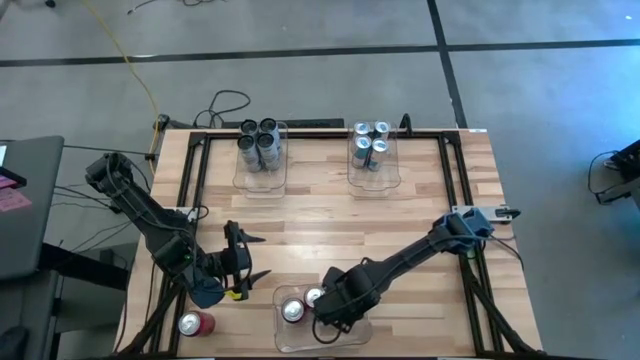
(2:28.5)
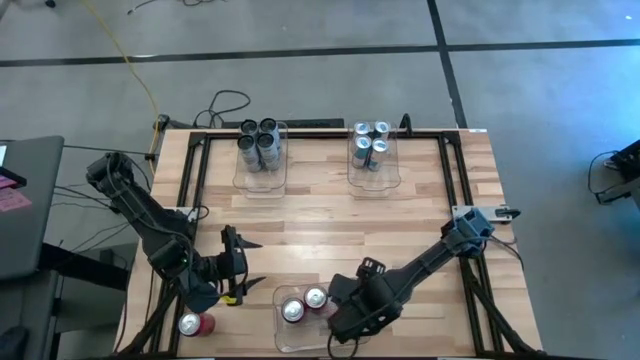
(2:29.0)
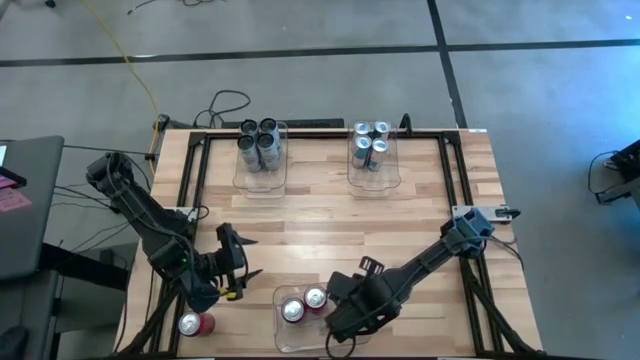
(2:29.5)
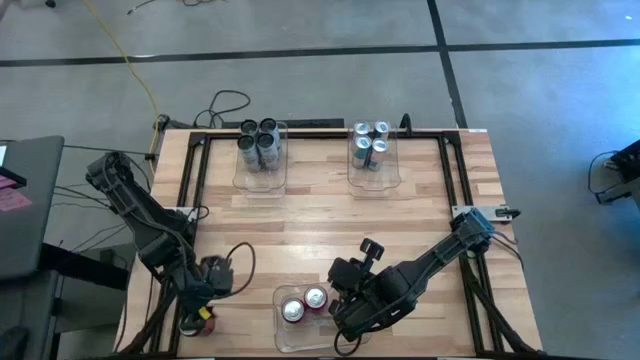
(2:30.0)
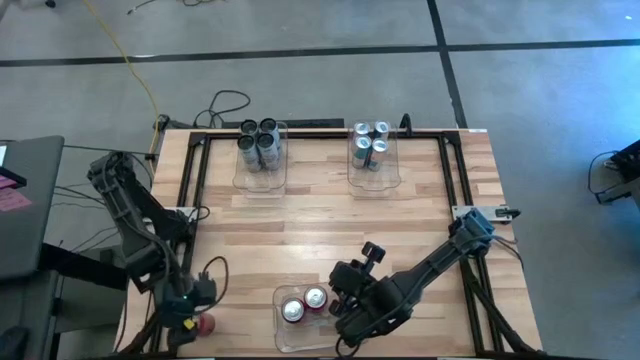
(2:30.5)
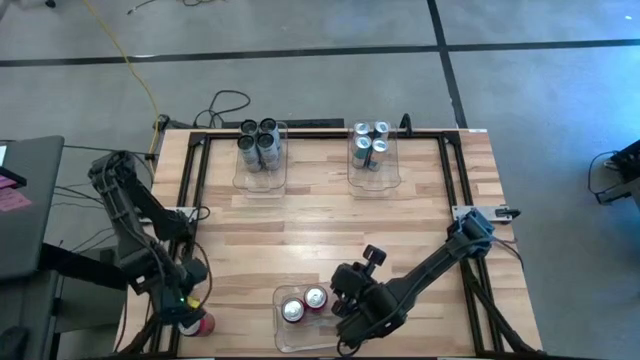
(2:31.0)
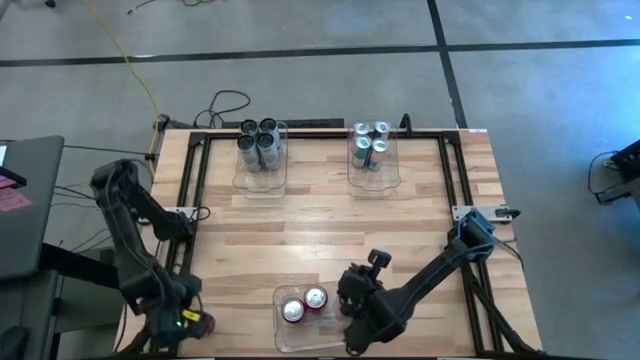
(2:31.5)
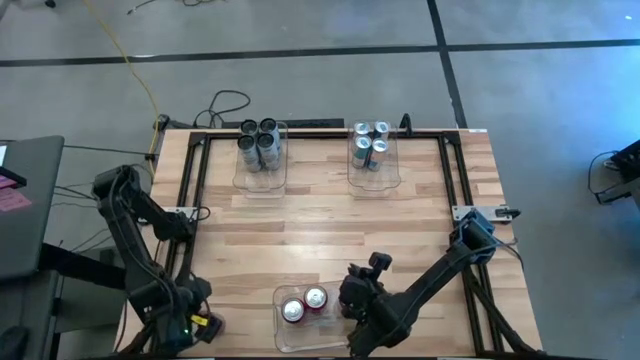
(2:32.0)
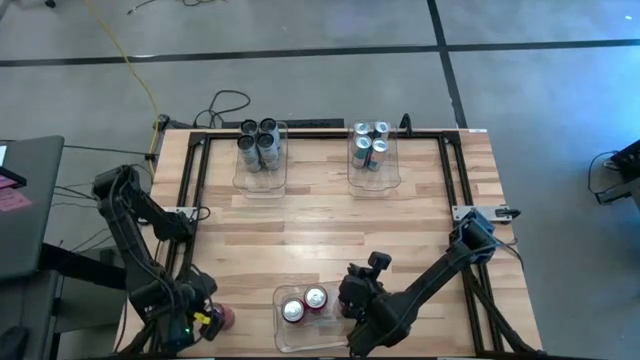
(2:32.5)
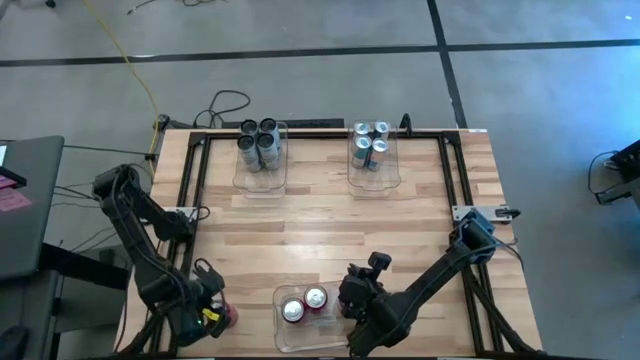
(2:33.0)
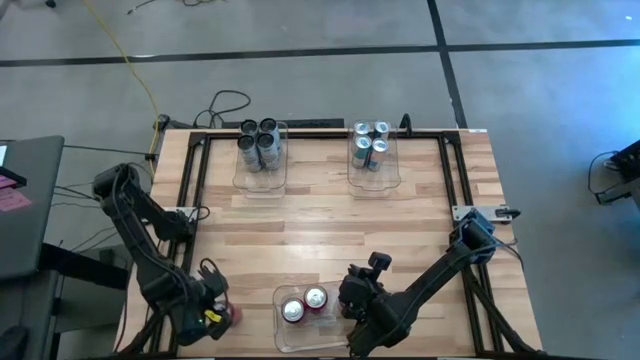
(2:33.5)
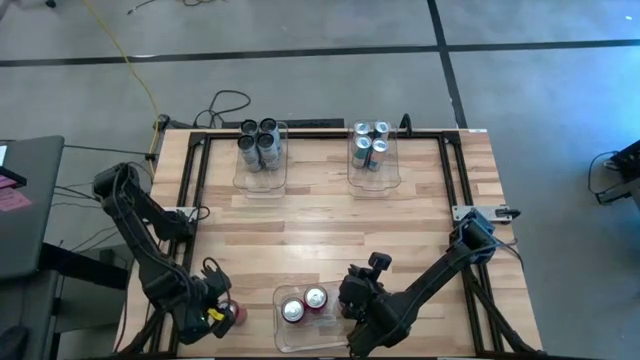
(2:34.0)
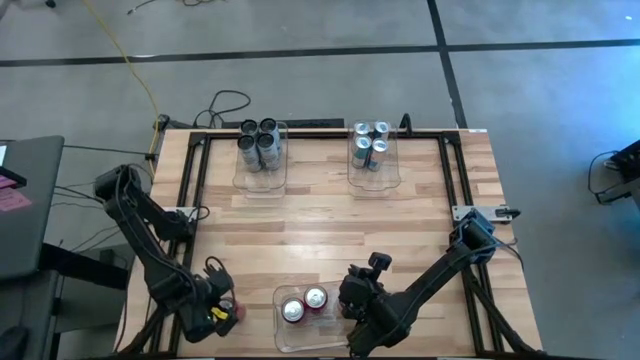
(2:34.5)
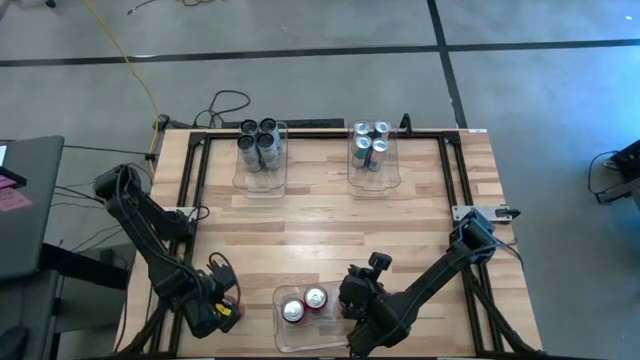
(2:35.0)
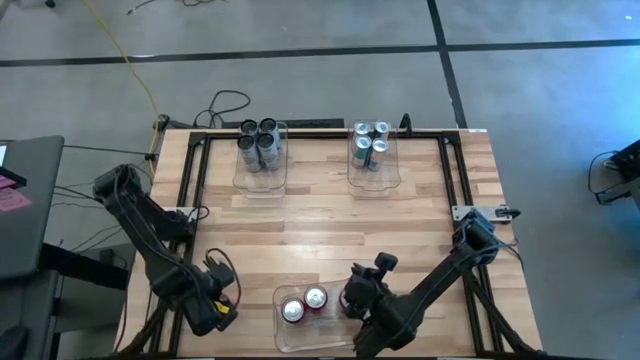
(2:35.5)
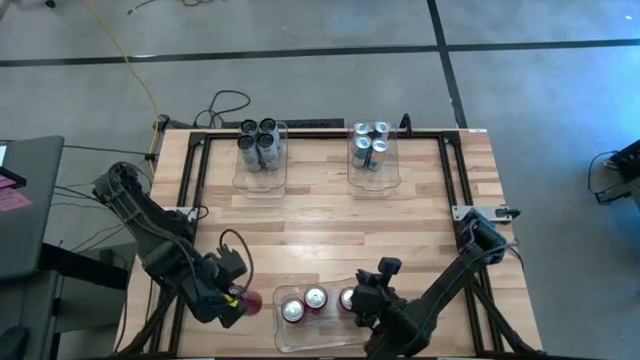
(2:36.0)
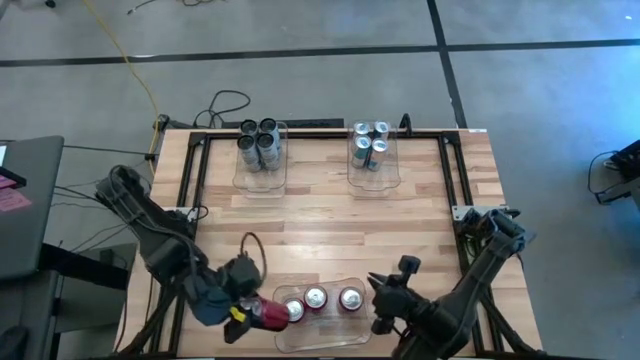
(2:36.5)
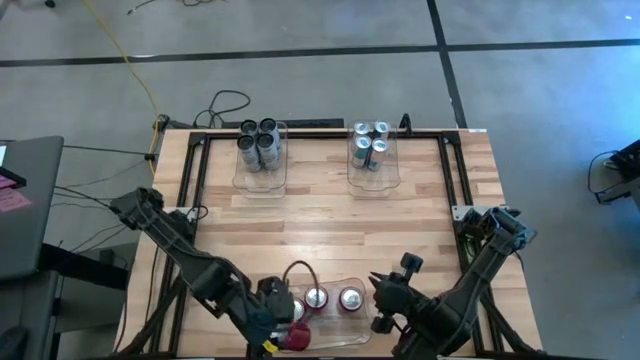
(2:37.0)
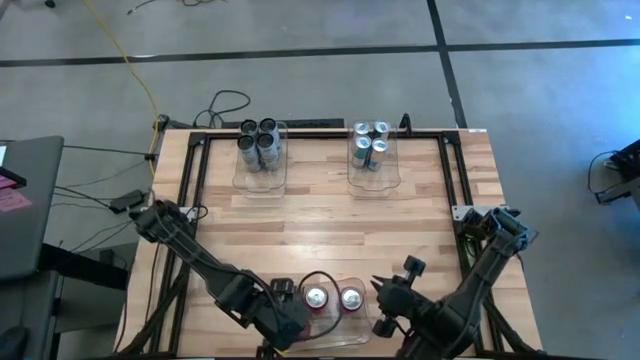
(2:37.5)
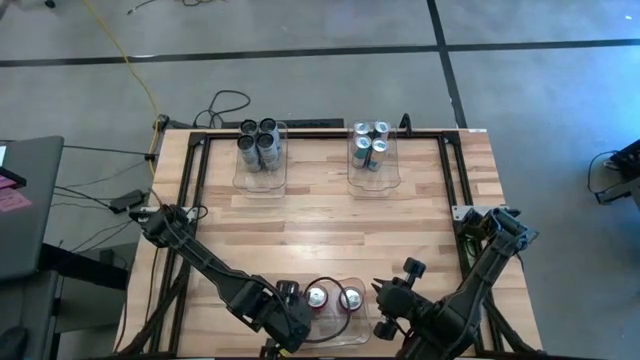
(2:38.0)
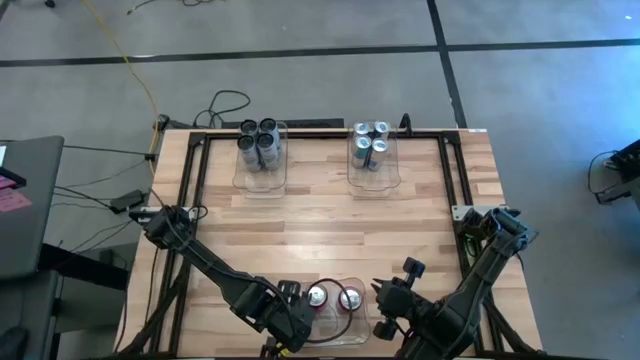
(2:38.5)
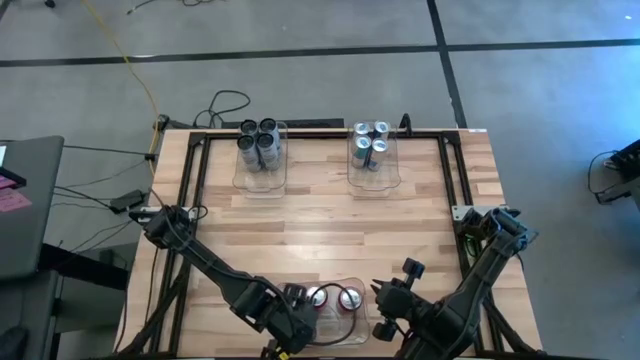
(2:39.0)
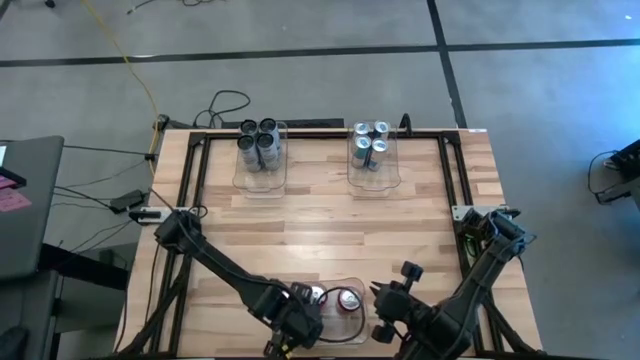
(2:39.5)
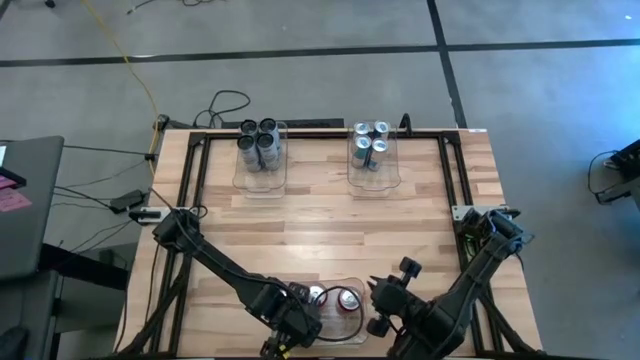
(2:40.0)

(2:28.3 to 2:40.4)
Task: Sort soda cans
Put the red and black soda can into the bottom transparent bin

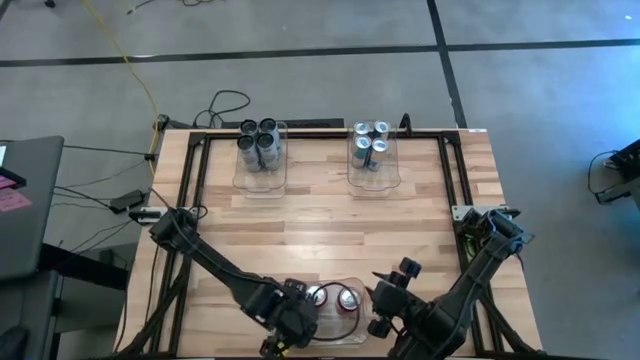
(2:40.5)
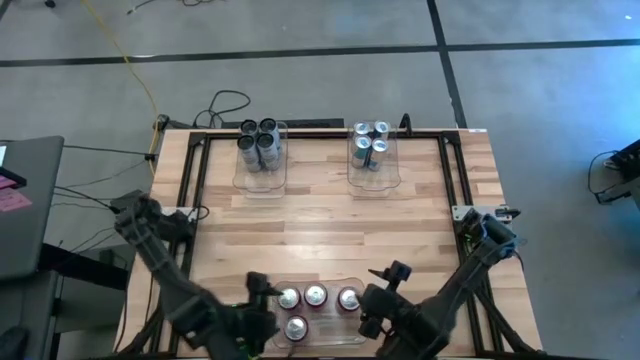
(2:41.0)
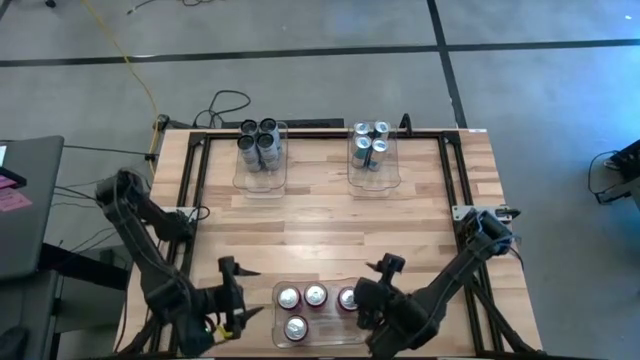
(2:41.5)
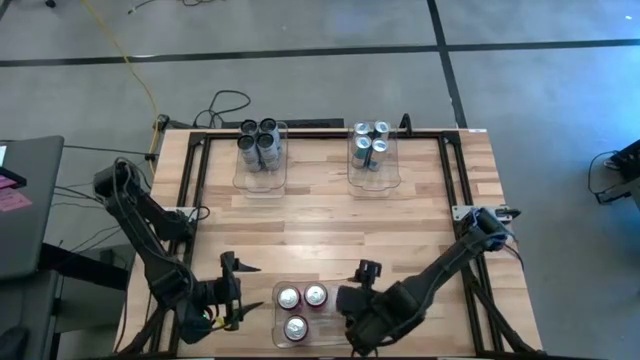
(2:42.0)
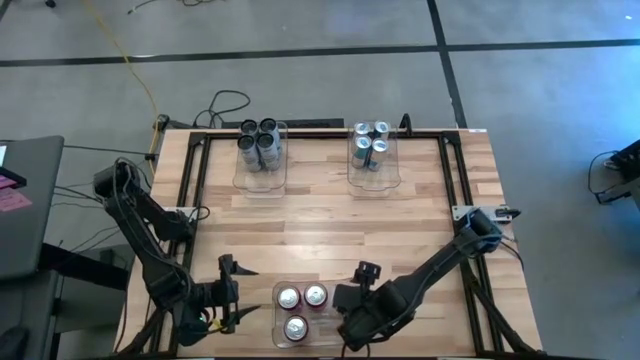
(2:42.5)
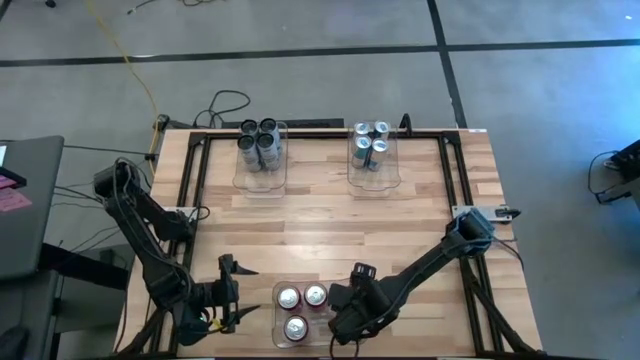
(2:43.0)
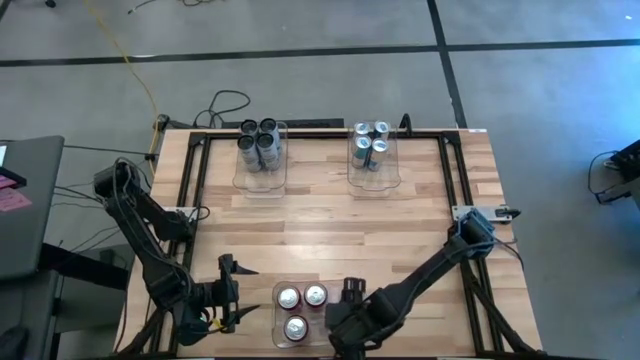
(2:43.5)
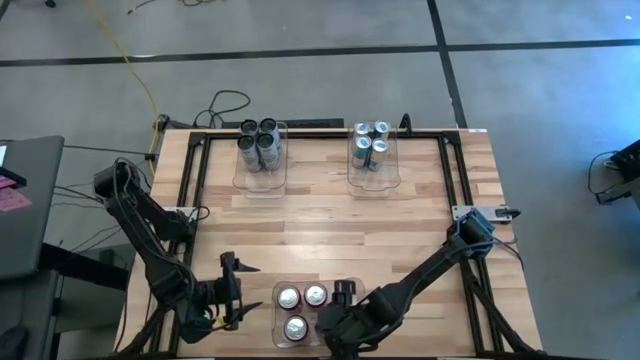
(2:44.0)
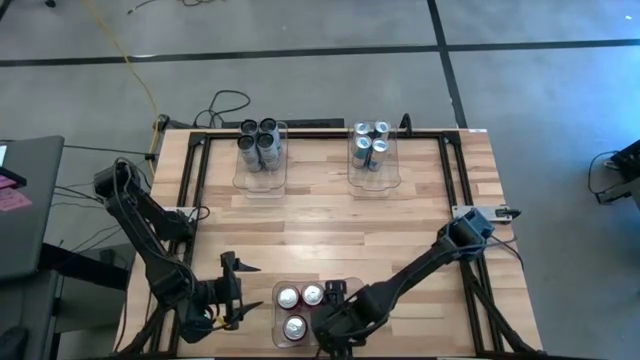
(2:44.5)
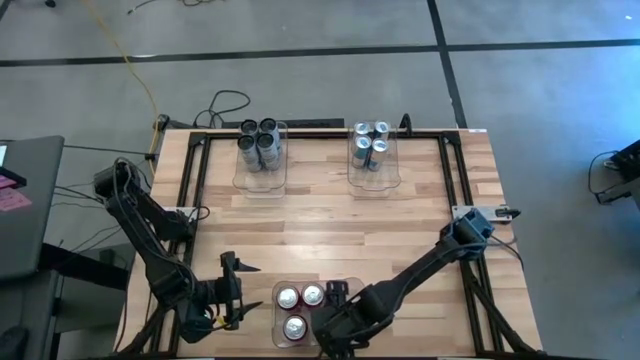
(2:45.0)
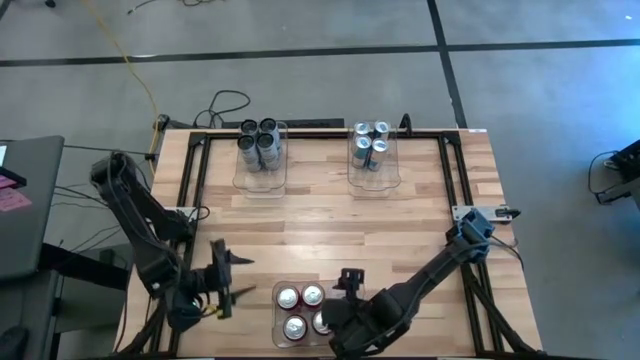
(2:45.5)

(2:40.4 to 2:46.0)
Adjust the red and black soda can in the bottom transparent bin

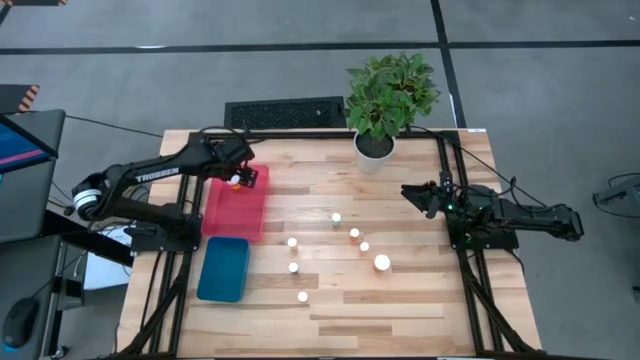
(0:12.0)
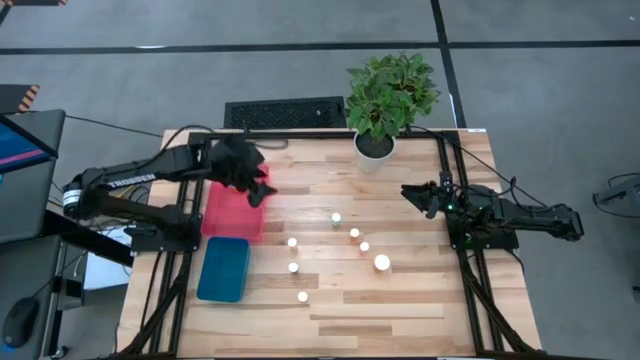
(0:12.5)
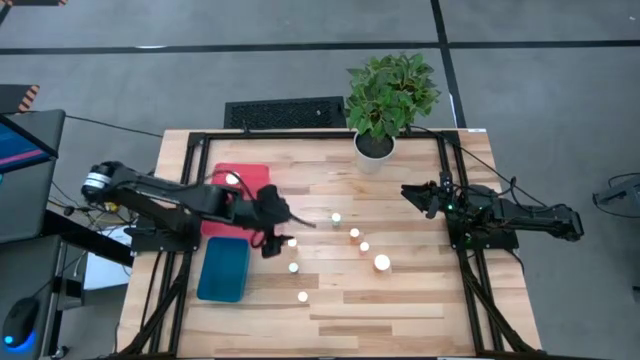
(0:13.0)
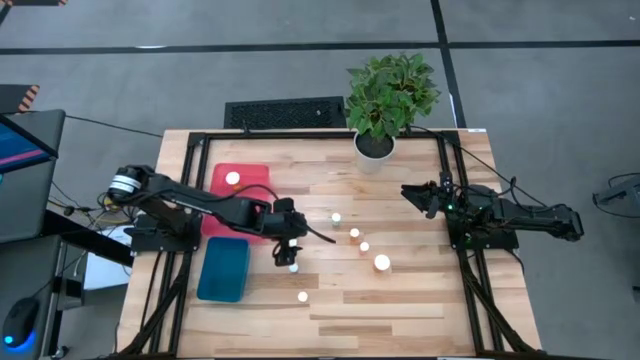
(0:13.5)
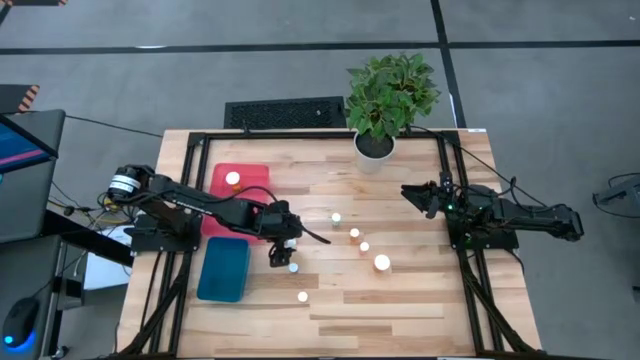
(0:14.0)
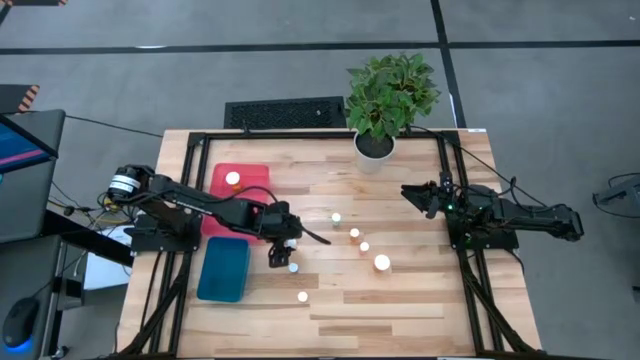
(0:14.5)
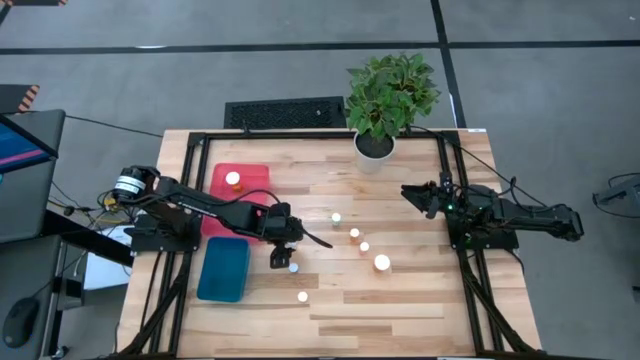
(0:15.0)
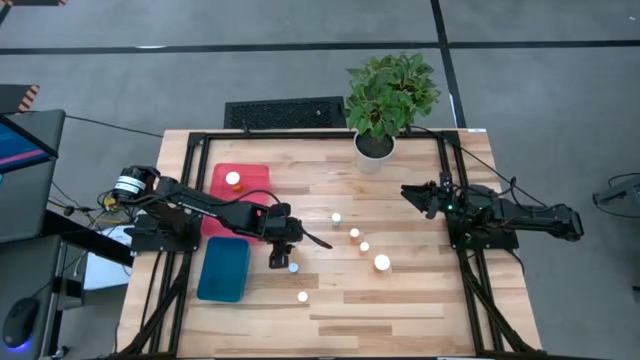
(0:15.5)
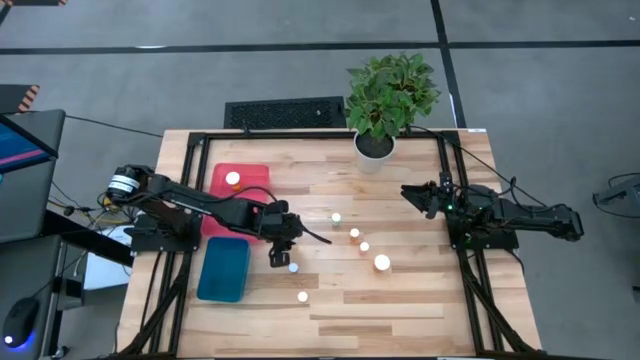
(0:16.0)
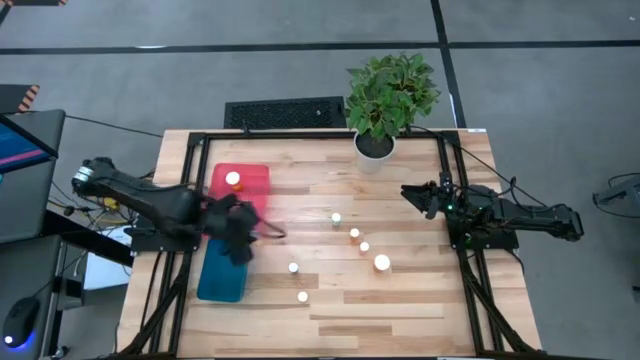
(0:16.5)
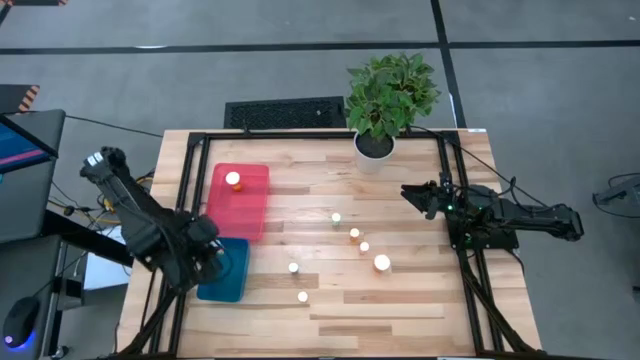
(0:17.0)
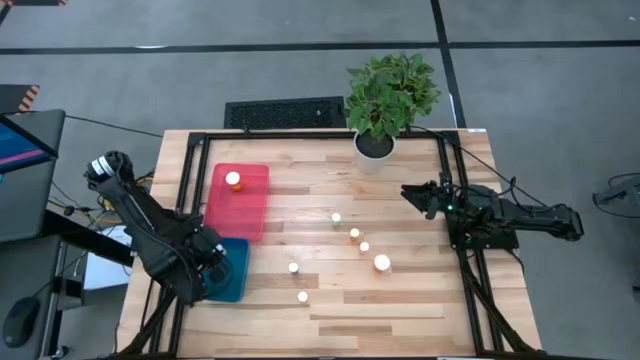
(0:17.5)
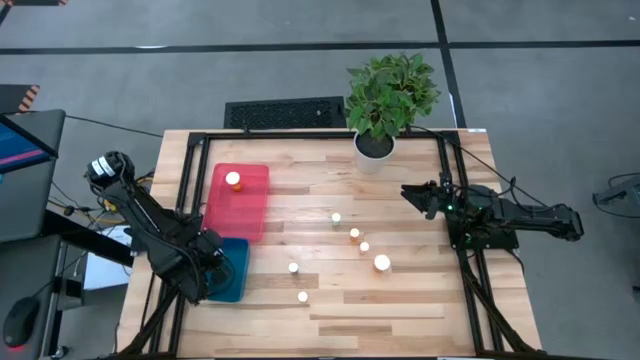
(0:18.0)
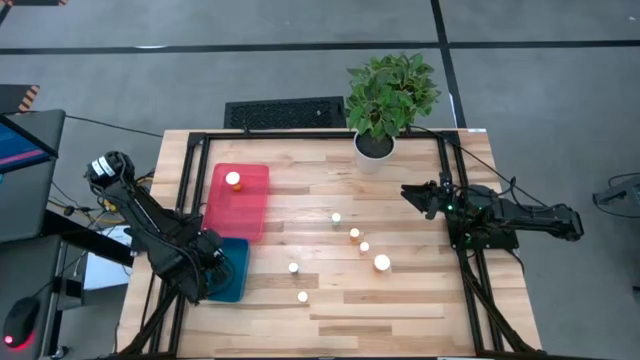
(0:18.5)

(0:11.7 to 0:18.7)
Task: Pick and place medicine bottles into bin by pill shape (circle, oval)
Put the yellow tablet bottle into the blue bin
